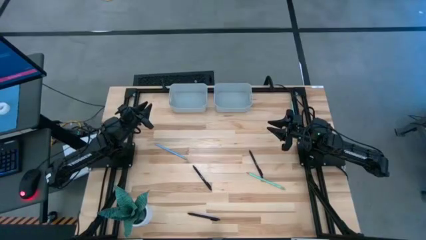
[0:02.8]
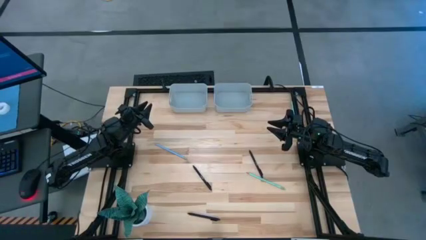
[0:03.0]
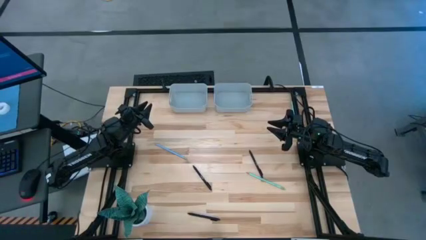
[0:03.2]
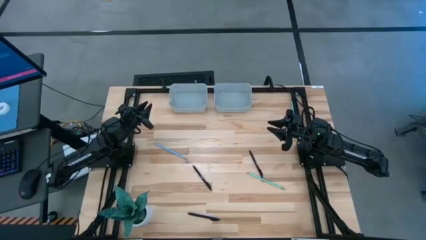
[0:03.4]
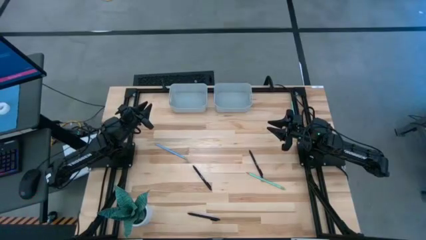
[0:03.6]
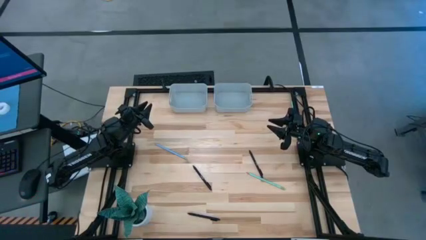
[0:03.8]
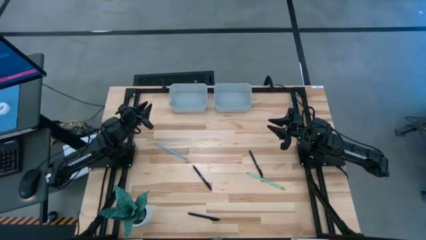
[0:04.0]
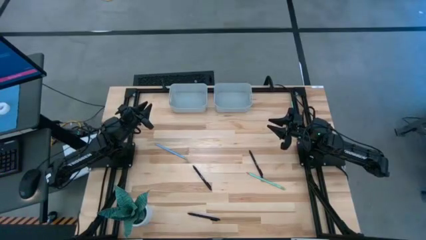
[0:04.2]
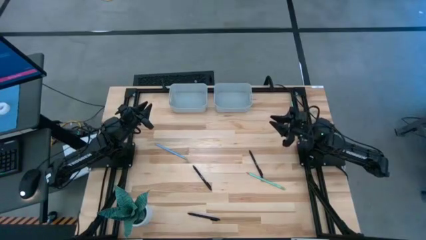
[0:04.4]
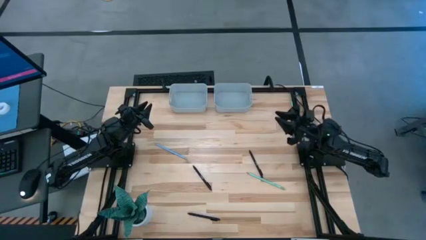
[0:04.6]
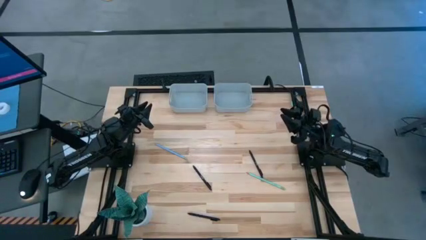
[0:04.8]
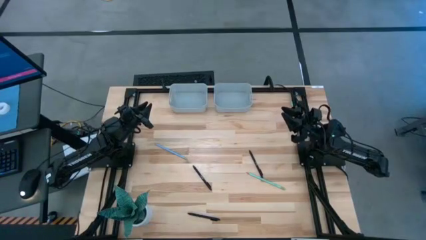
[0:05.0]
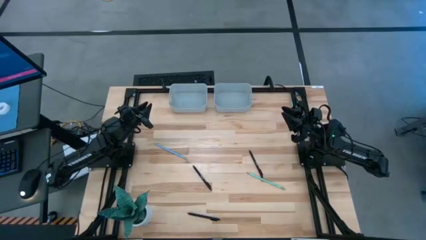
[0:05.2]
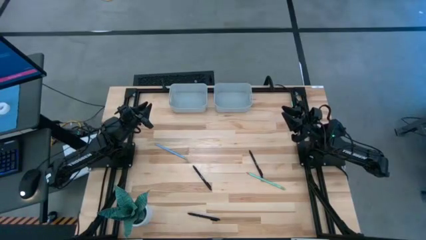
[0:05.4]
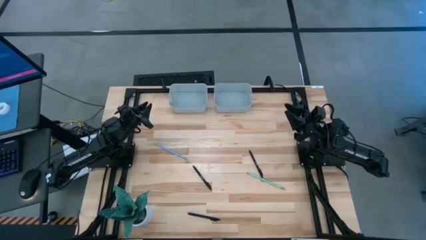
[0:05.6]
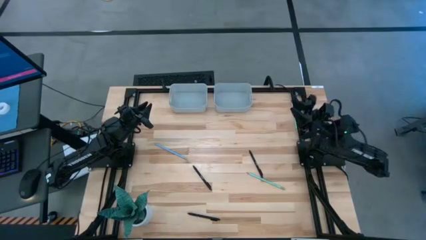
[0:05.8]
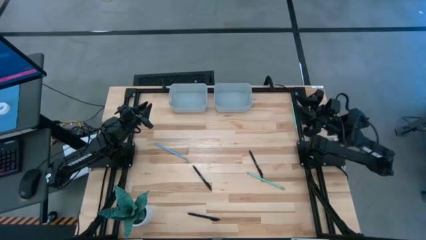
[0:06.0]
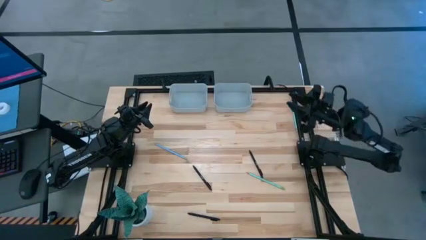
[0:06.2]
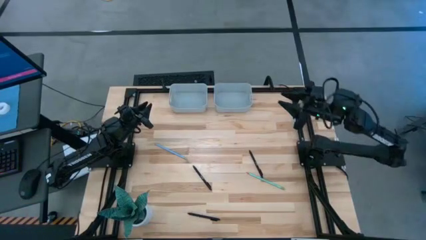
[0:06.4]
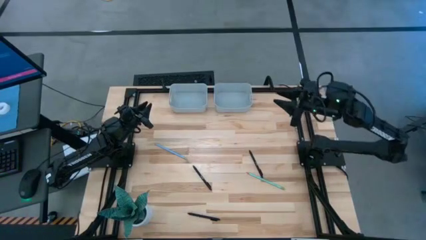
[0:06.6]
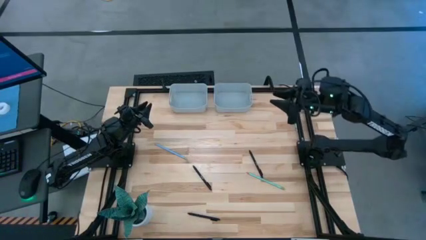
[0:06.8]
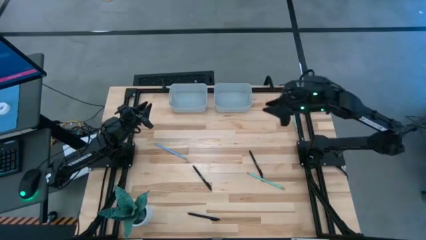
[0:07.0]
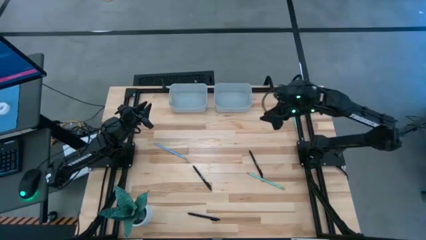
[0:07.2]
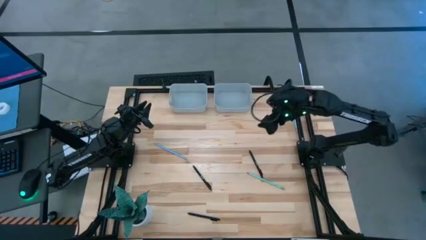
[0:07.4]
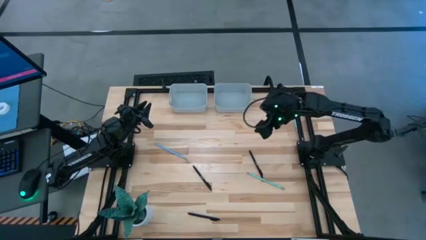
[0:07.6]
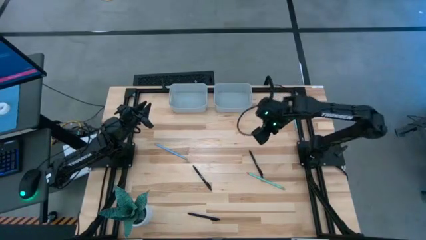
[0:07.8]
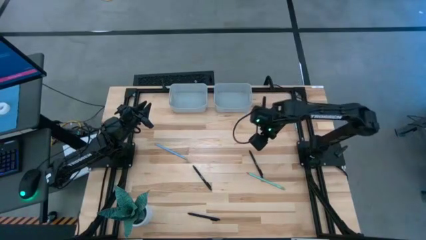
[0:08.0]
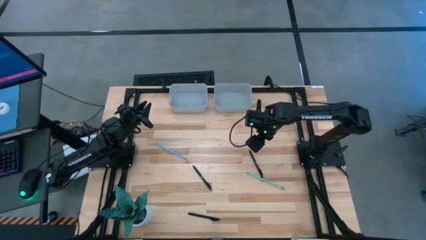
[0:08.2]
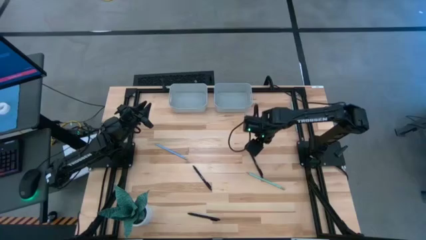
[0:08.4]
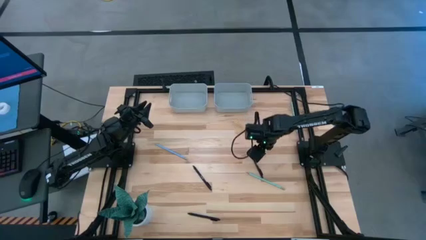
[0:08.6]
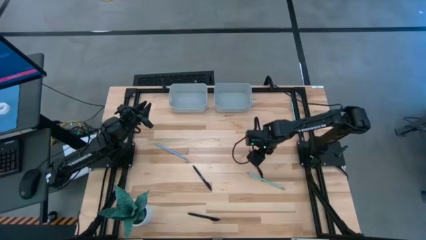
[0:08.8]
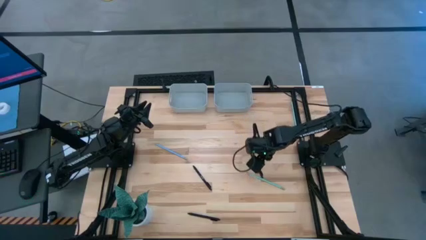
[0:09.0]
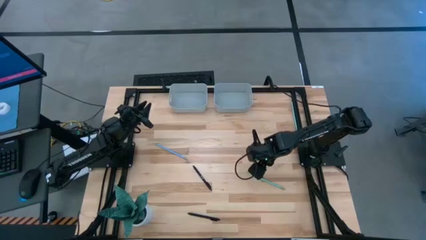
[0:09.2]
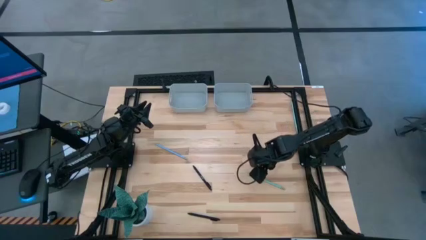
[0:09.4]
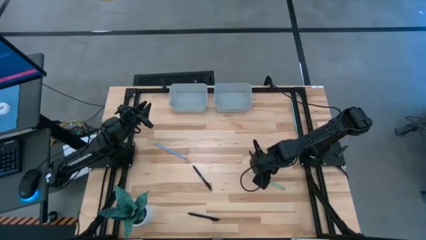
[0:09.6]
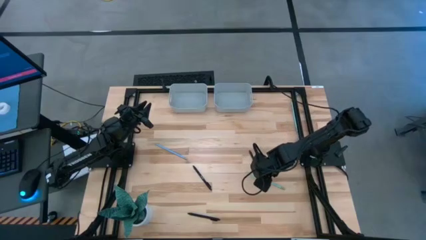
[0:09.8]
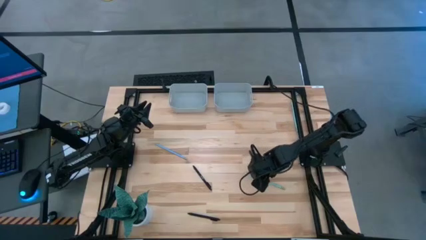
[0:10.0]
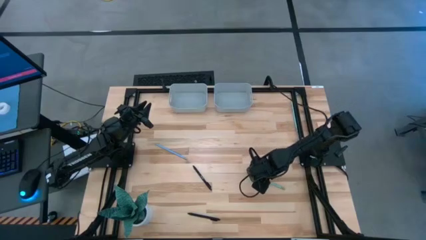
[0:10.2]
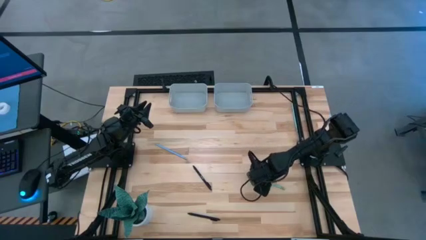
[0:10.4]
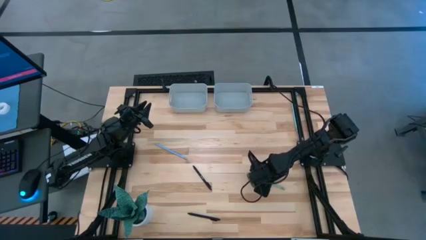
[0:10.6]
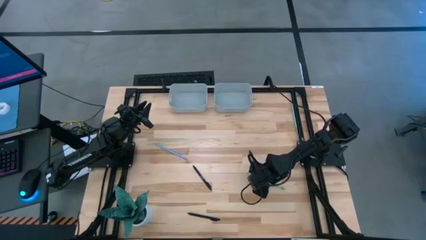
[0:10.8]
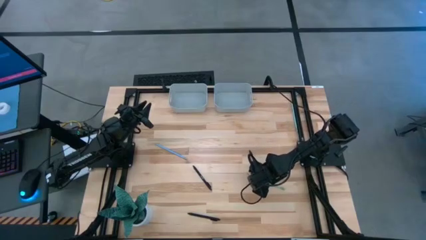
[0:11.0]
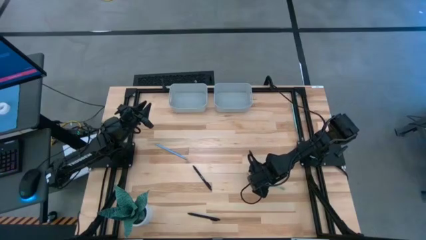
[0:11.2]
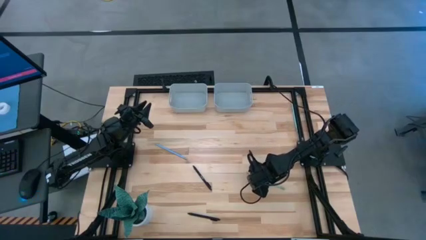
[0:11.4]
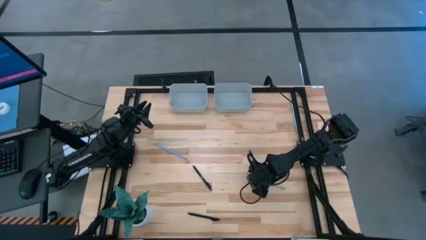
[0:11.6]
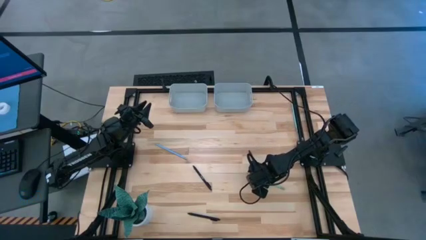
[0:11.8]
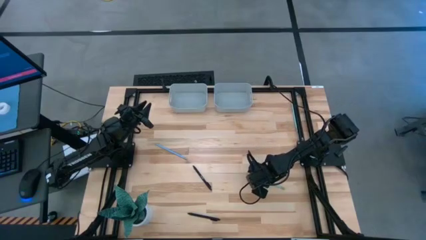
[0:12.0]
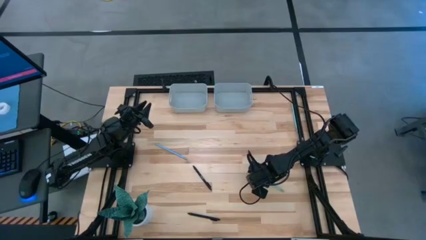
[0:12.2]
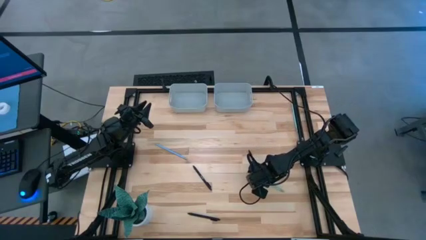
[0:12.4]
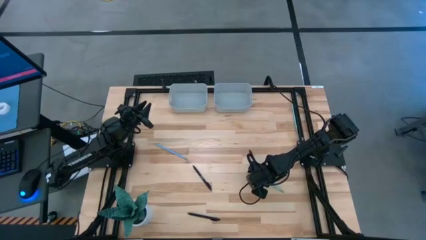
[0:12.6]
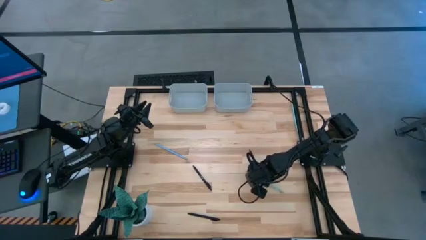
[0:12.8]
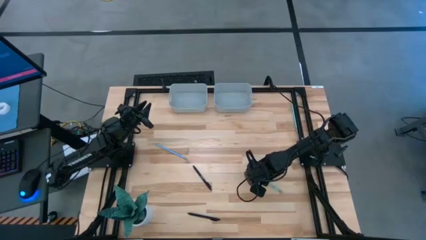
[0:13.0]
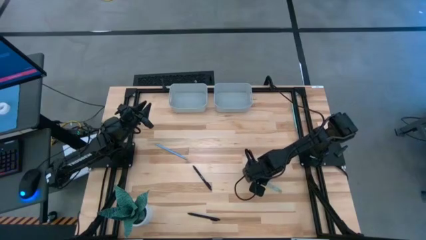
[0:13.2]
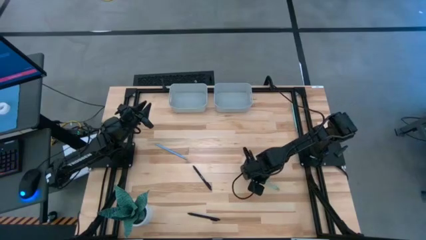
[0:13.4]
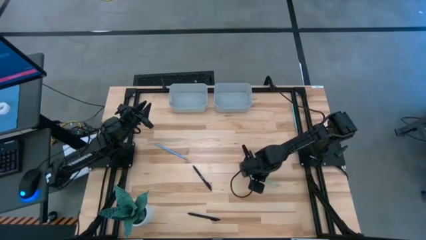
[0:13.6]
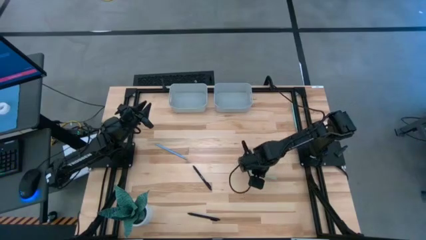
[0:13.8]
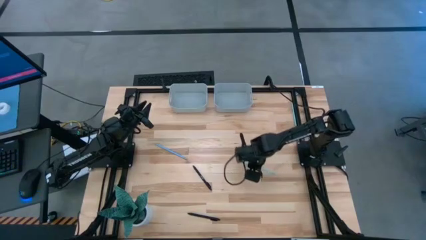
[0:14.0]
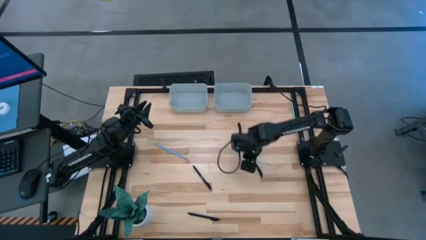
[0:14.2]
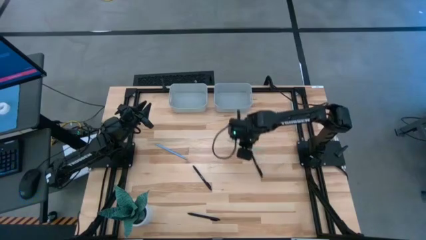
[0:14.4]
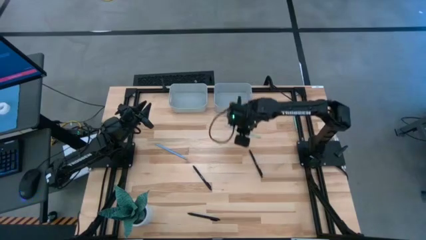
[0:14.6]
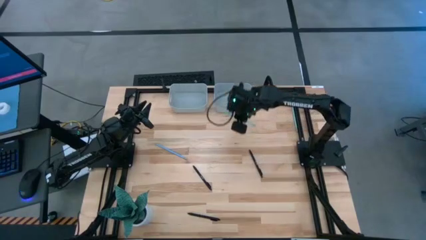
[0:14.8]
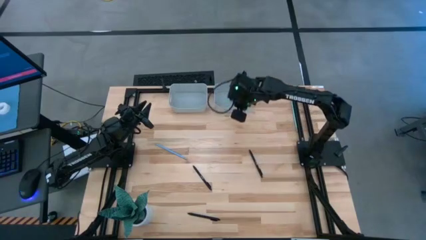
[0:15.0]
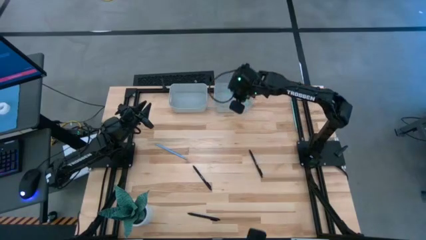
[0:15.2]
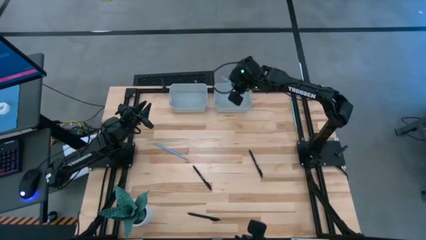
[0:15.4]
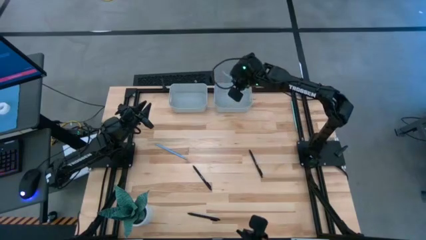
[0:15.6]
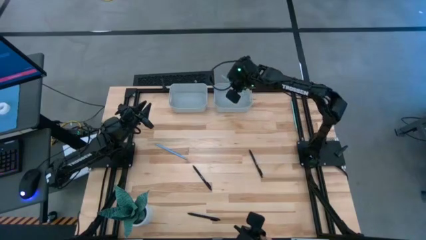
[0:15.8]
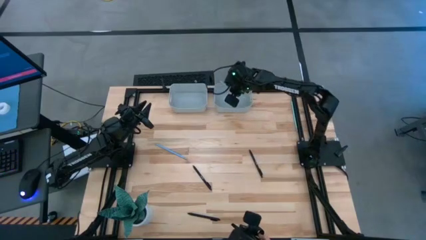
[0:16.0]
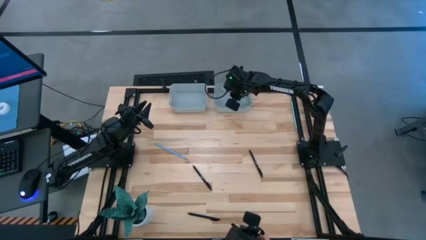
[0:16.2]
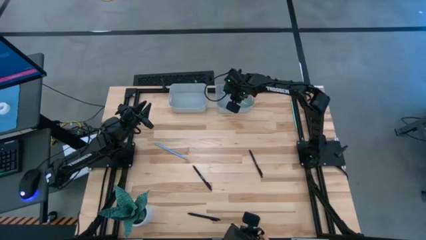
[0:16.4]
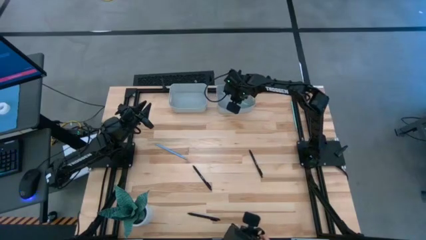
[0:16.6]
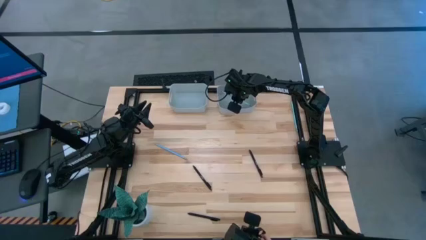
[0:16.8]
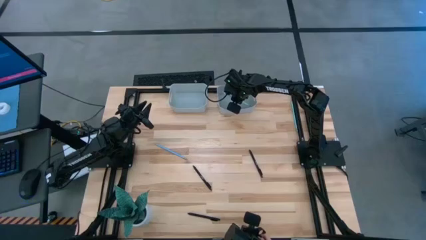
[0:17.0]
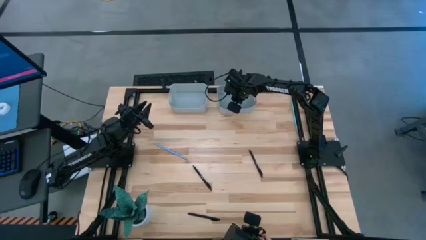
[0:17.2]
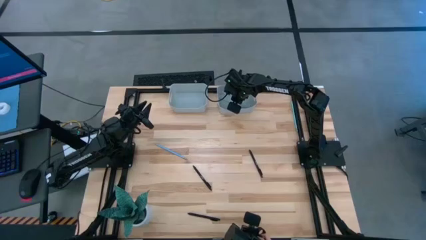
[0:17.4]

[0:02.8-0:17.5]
Task: Sort pens & pencils
Put the bottom light green pencil into the right gray bin
